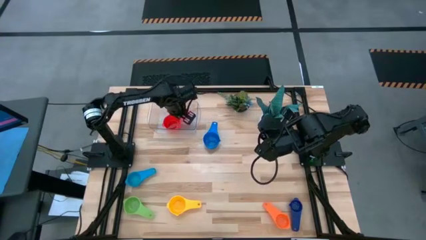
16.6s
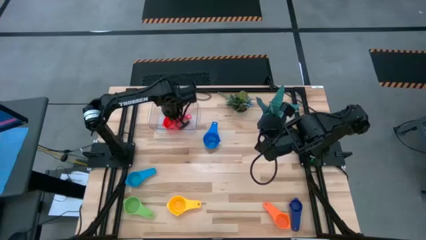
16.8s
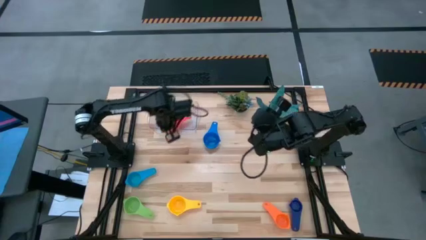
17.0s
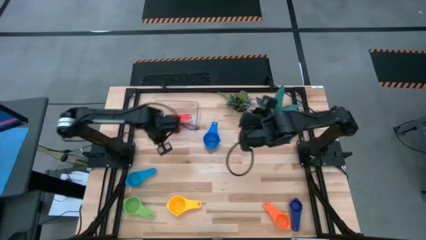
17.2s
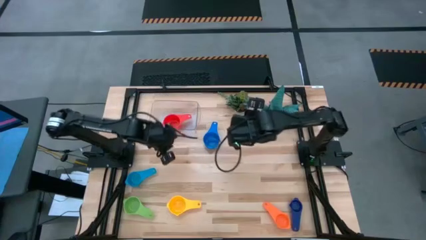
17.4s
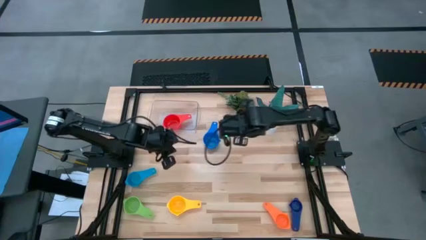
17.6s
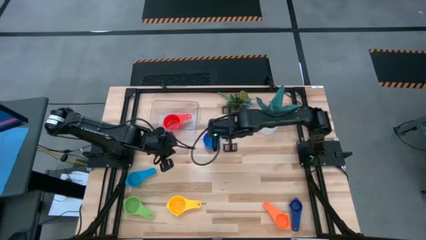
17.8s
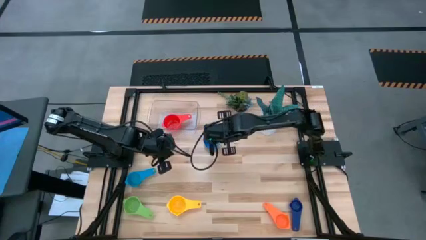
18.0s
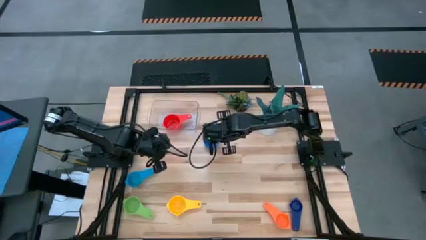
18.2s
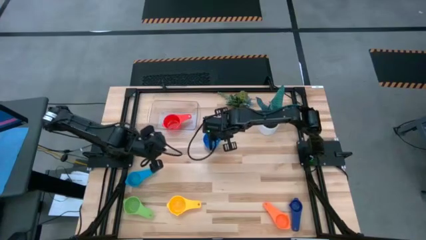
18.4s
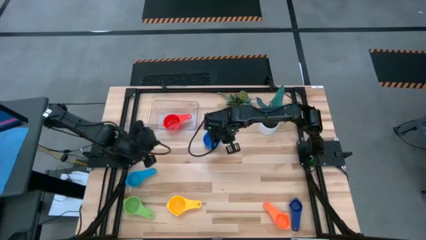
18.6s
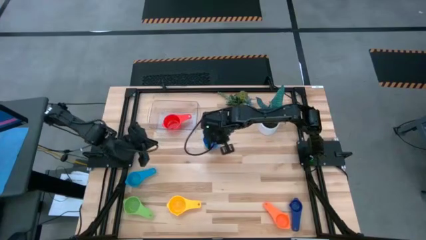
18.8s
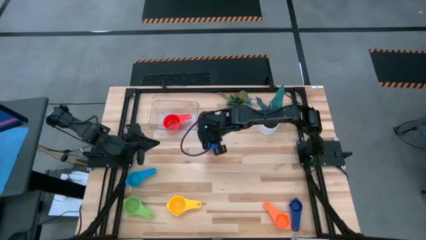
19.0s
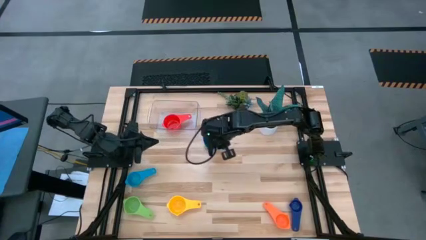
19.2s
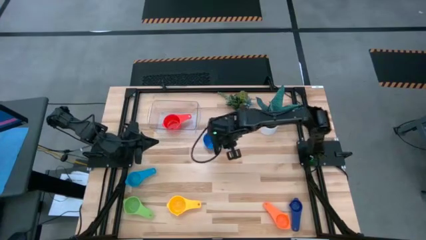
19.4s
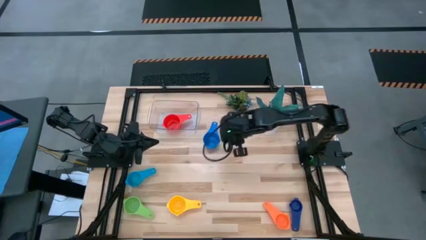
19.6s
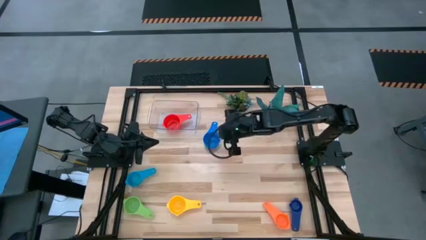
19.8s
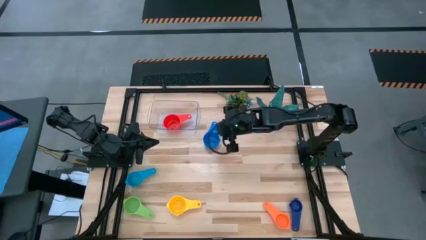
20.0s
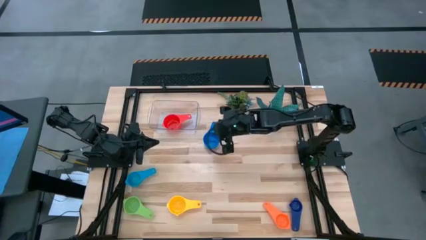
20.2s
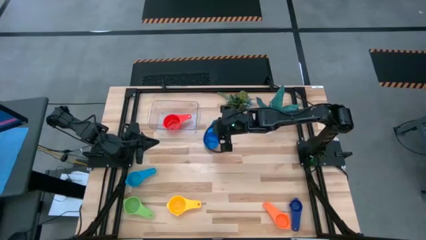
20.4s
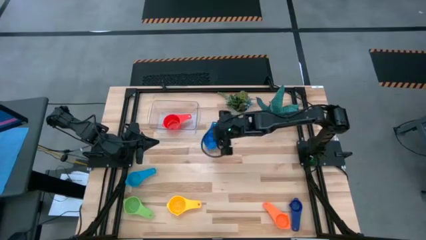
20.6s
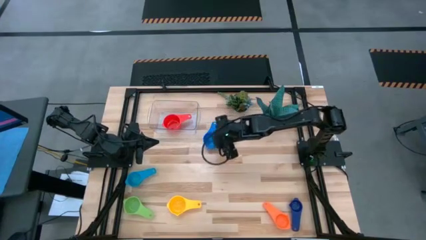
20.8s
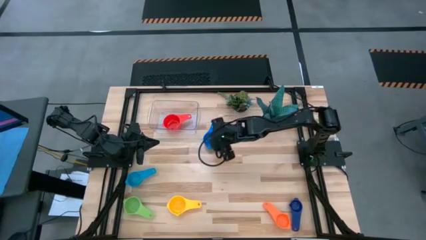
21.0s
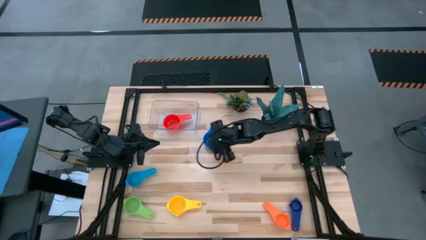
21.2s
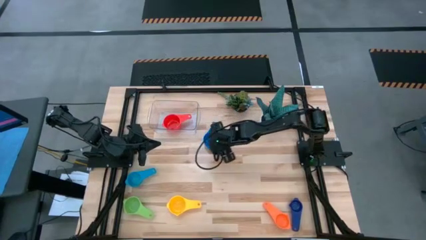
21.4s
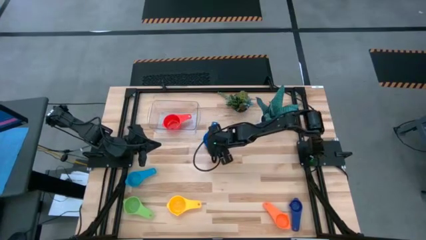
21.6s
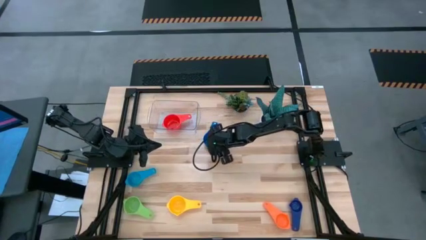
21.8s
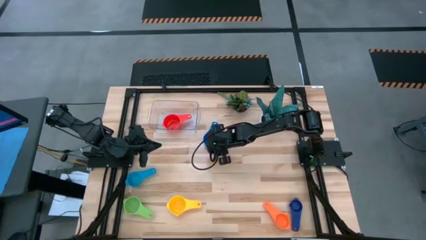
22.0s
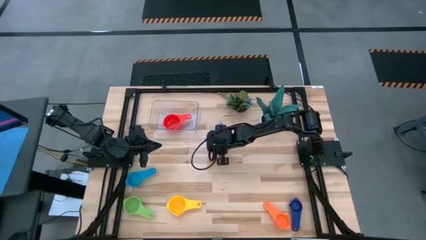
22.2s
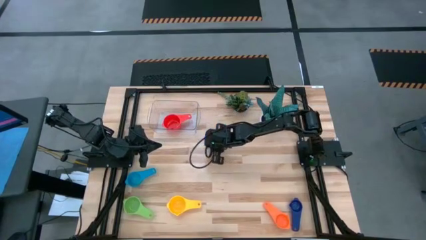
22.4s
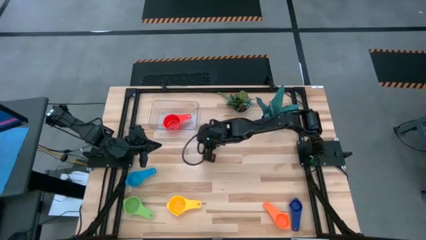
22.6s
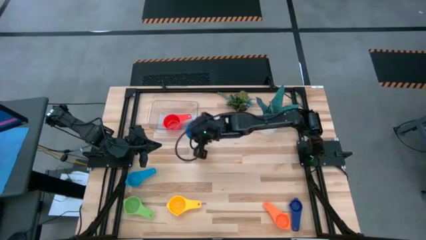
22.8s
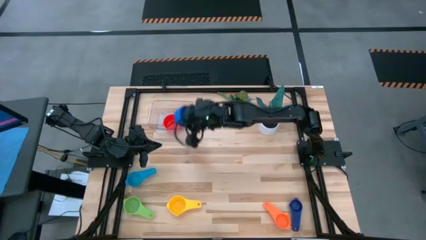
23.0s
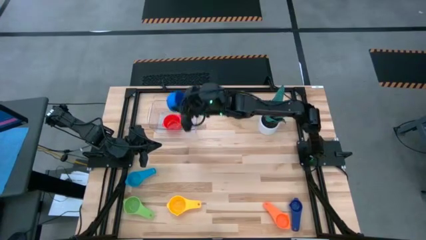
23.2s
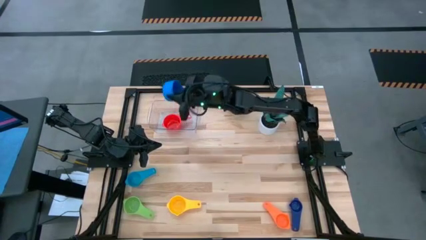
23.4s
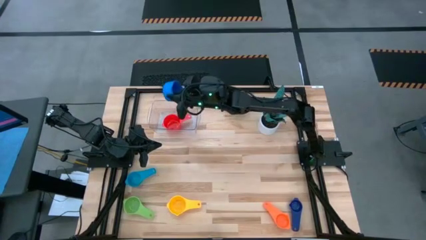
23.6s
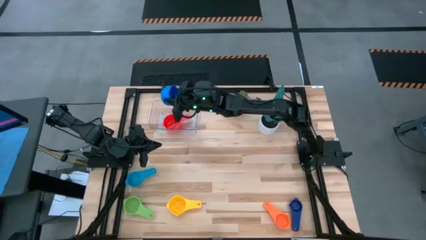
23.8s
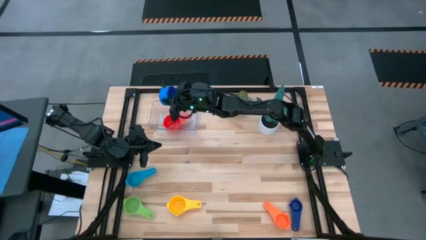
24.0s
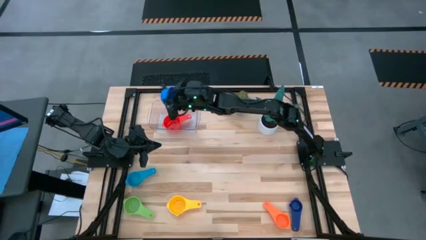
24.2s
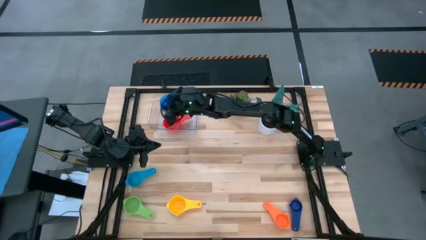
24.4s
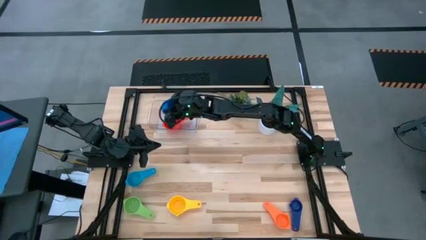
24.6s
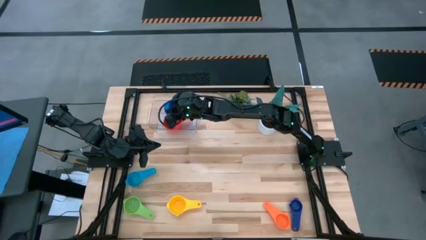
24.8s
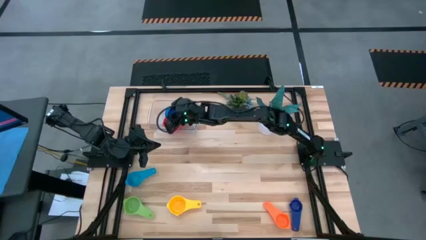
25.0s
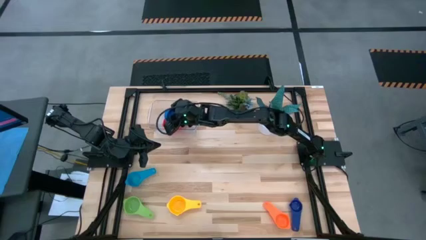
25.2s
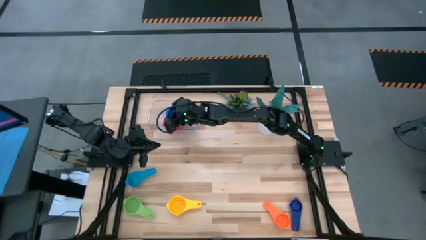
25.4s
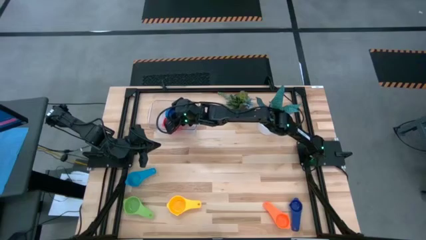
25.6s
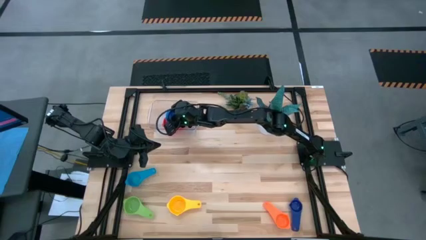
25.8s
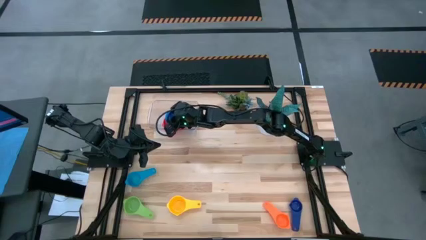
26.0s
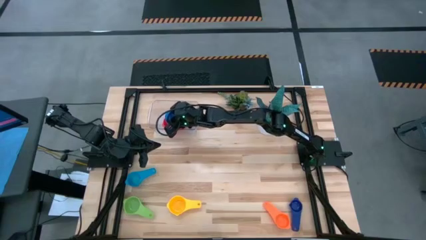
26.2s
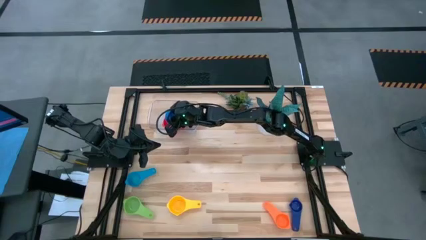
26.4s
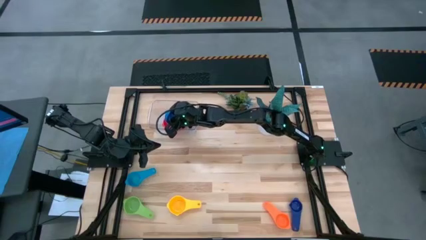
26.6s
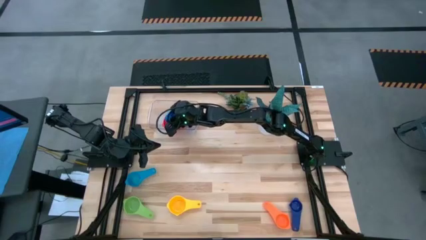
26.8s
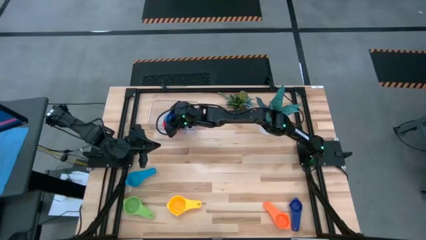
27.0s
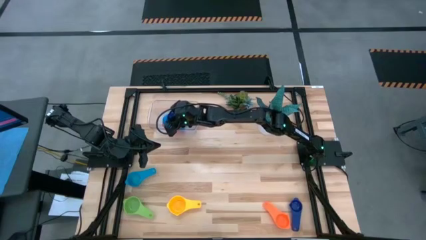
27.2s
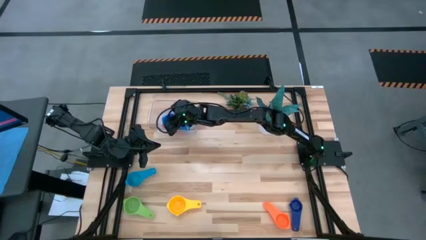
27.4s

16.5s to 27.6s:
Task: Nest measuring cups in basket
Stack the blue measuring cup on top of the red measuring cup in the transparent bin

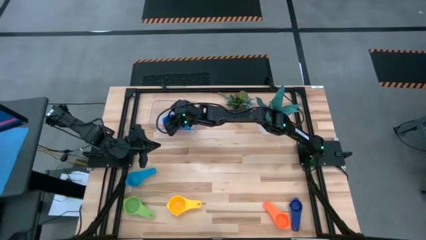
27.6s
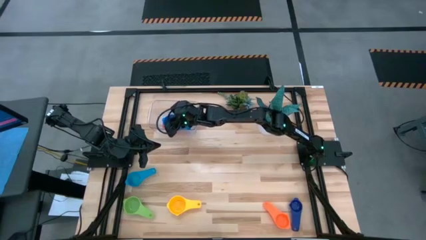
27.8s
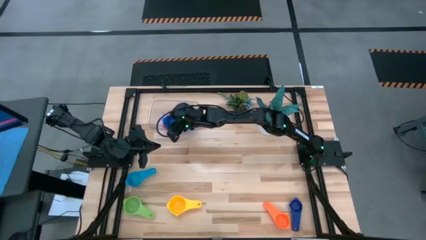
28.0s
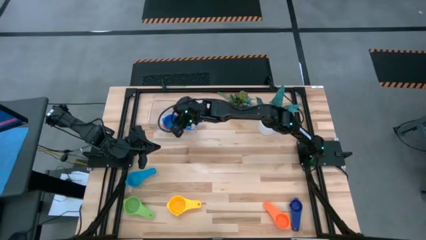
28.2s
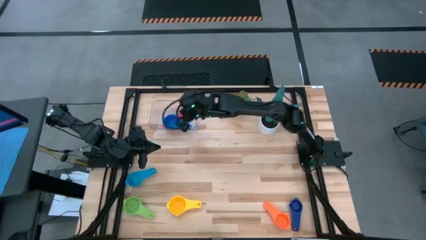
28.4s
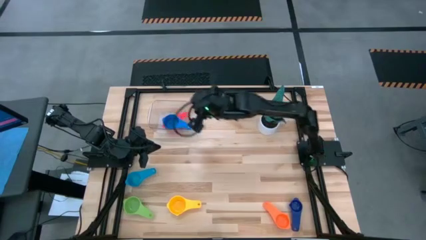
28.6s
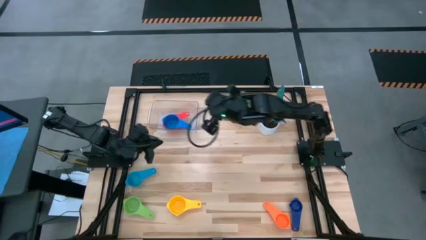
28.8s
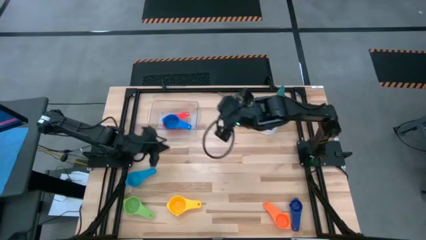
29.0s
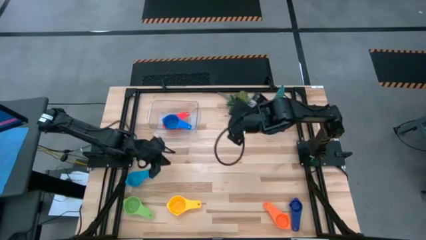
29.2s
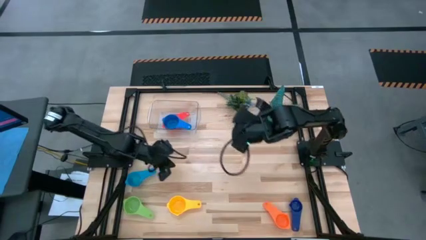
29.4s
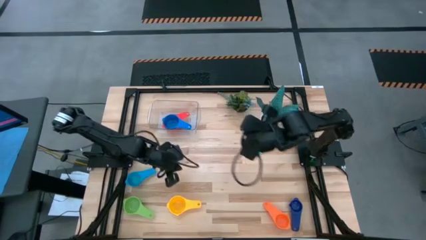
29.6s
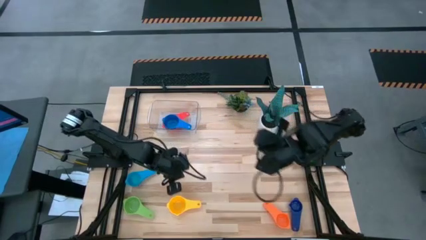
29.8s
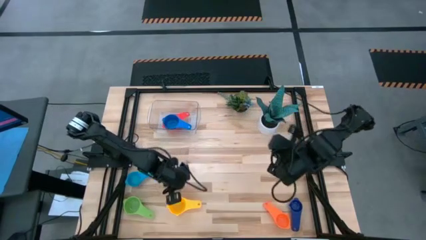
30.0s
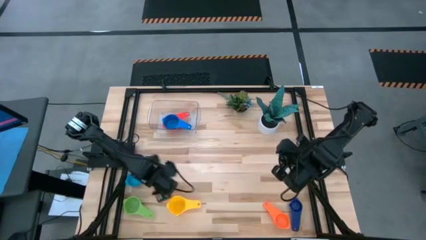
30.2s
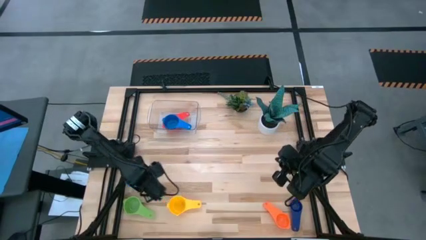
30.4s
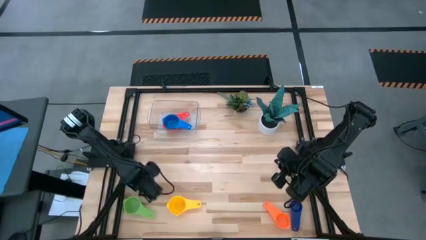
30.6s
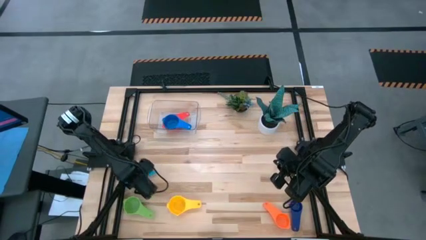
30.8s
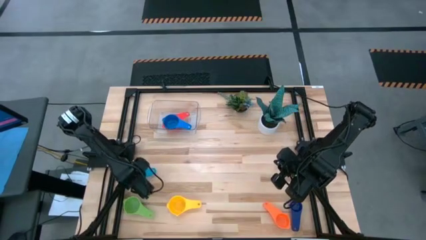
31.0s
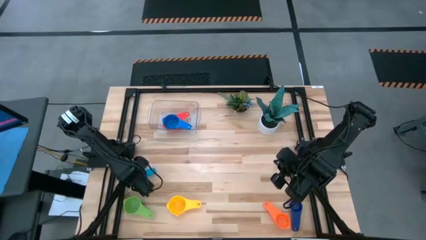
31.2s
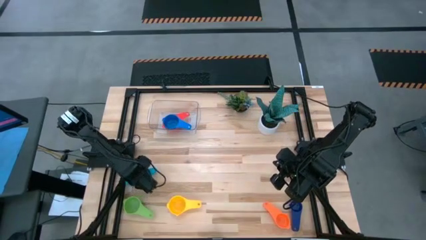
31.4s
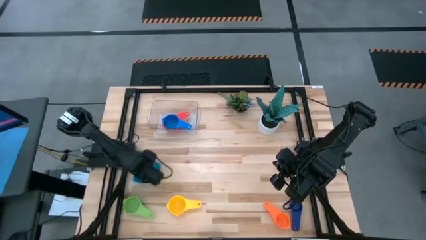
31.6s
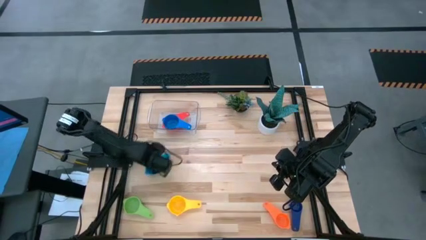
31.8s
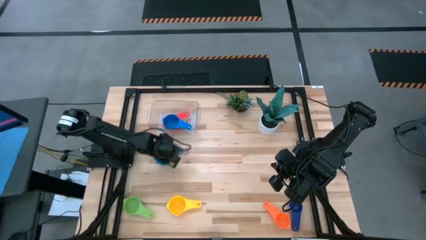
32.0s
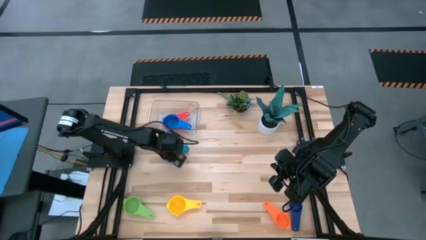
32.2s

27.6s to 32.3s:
Move the light blue measuring cup to the center of the table

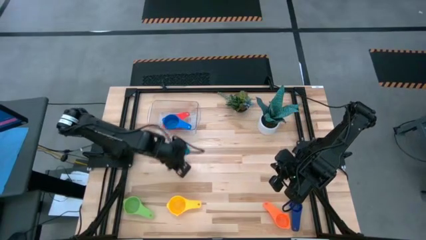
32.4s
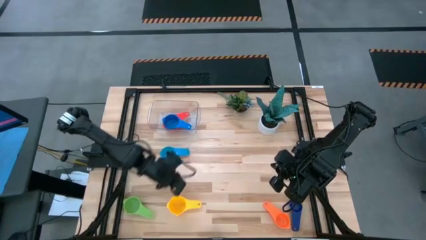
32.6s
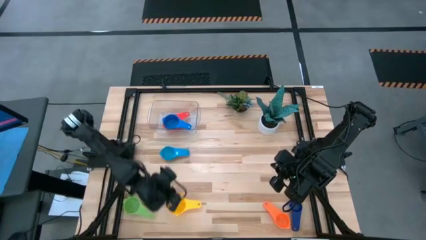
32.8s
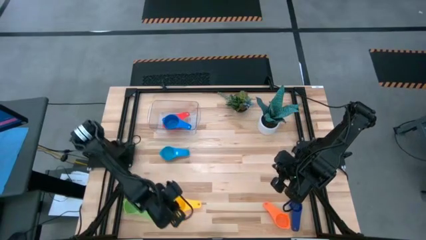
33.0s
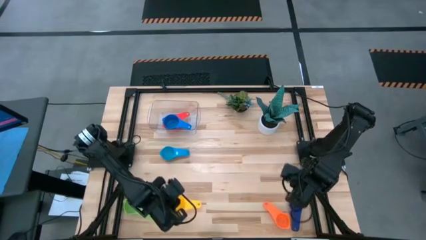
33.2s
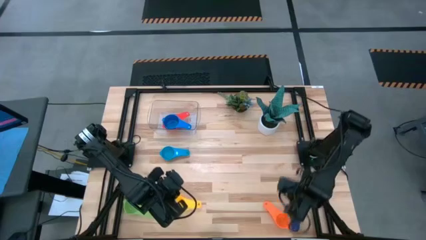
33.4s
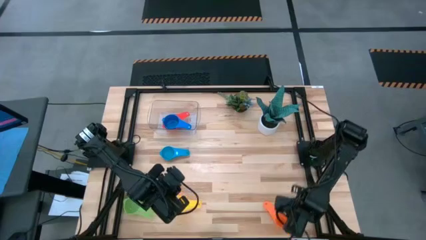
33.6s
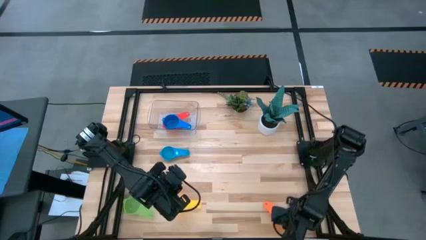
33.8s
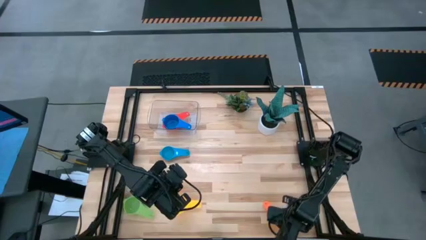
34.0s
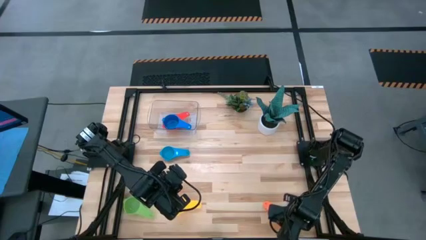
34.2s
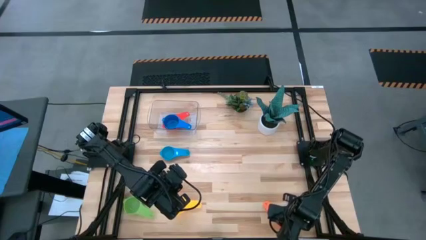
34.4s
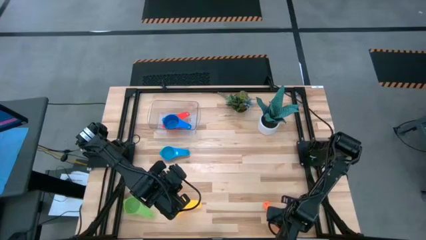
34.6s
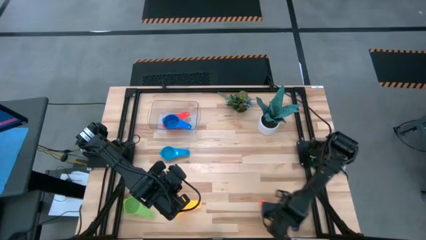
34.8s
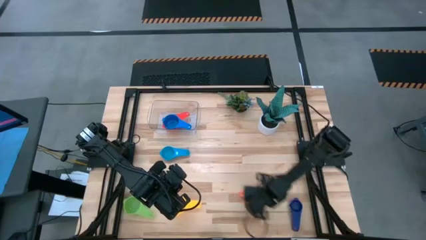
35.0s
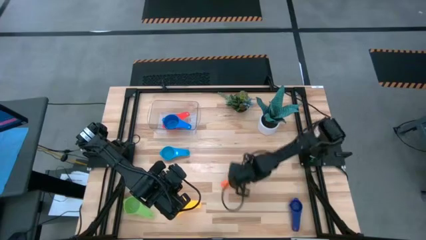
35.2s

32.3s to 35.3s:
Move the orange measuring cup to the center of the table
